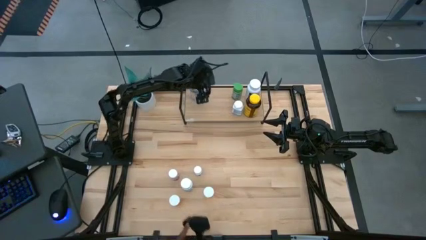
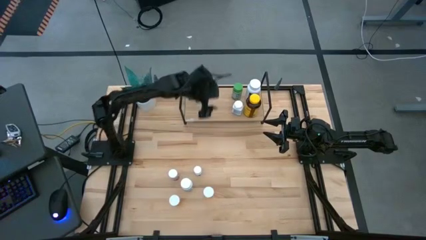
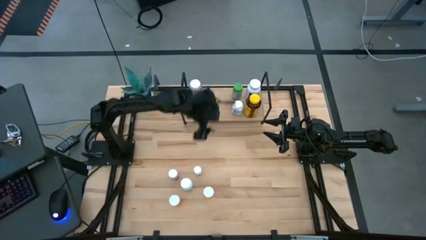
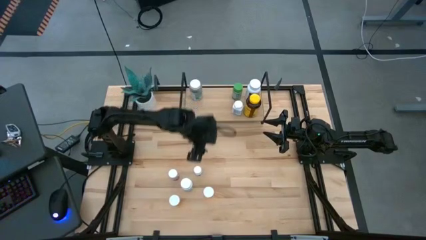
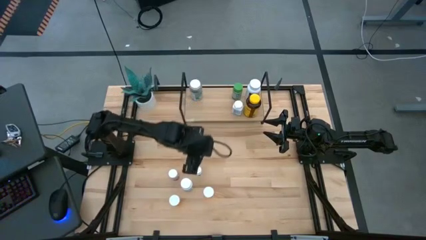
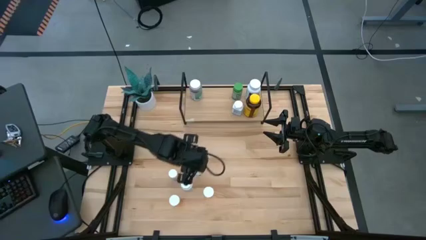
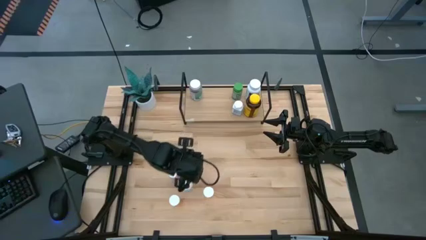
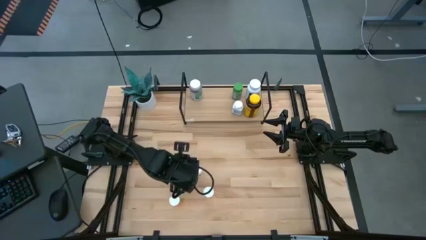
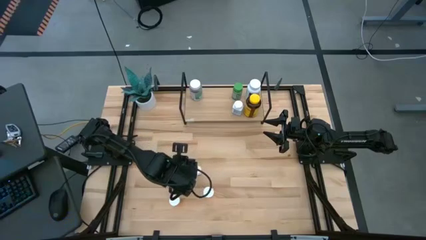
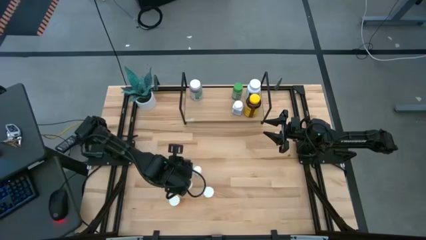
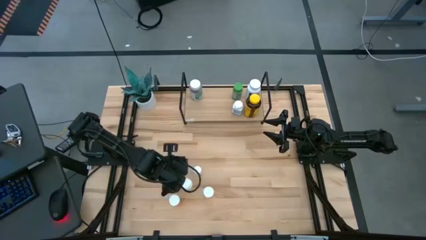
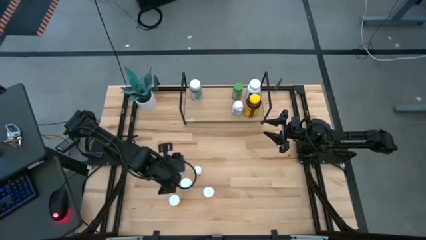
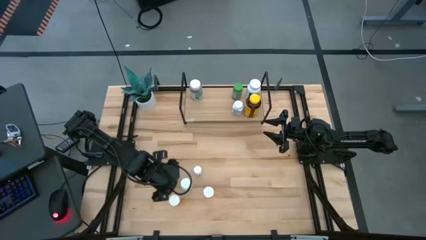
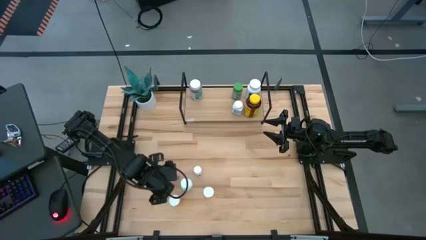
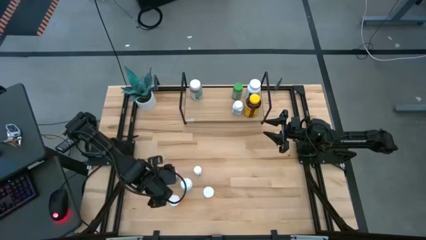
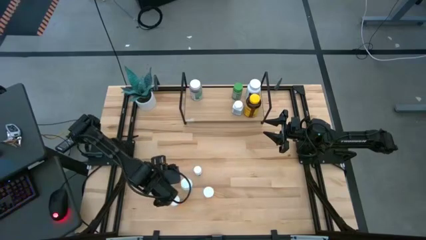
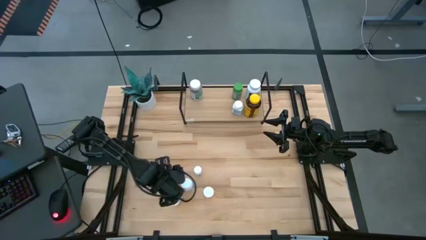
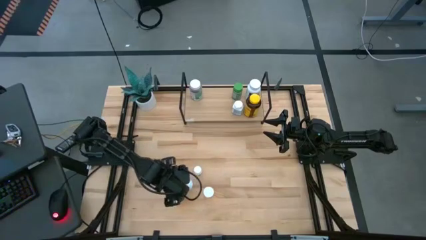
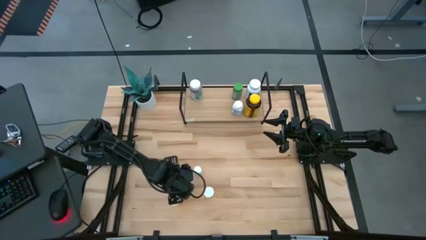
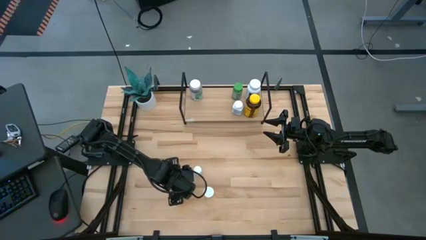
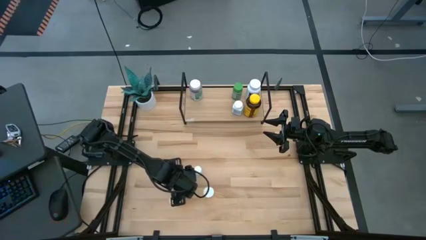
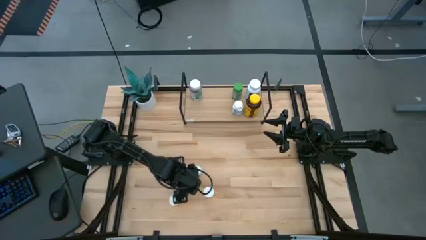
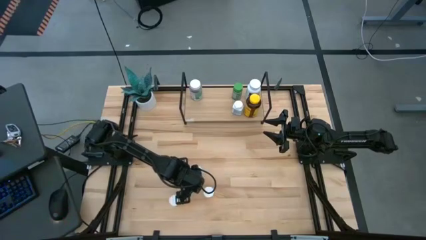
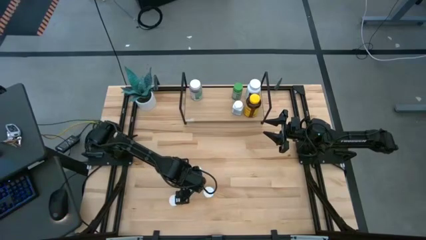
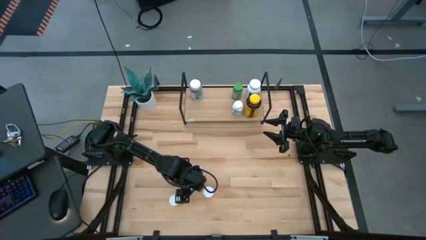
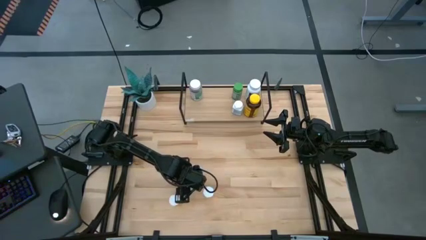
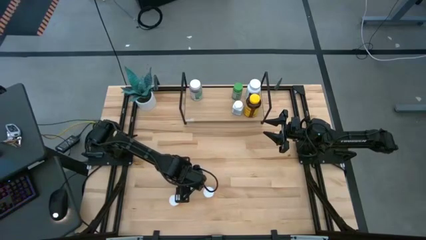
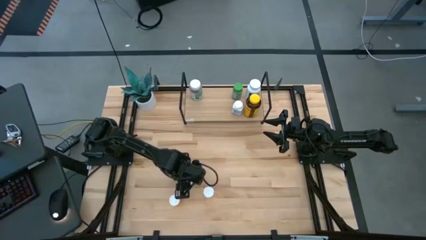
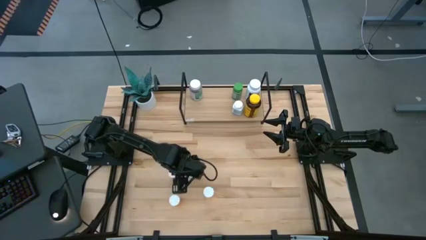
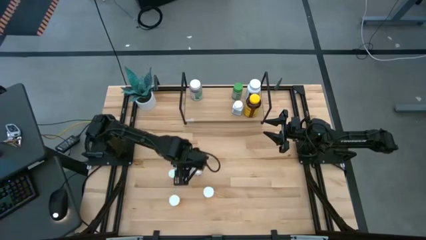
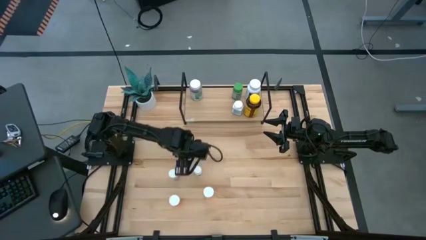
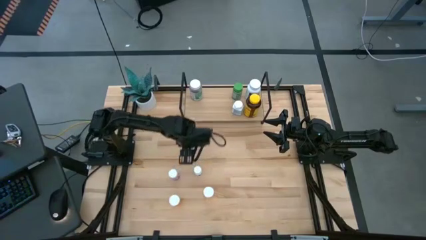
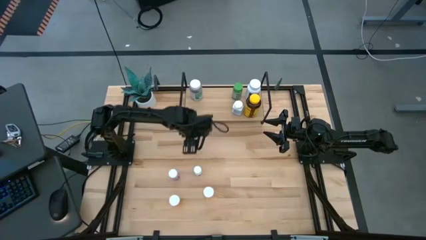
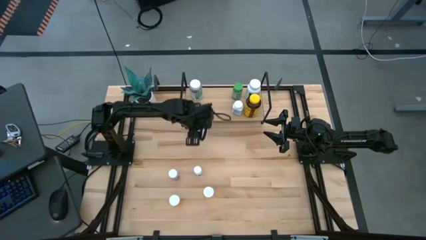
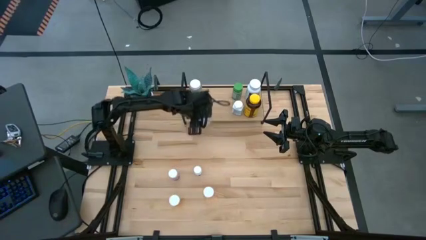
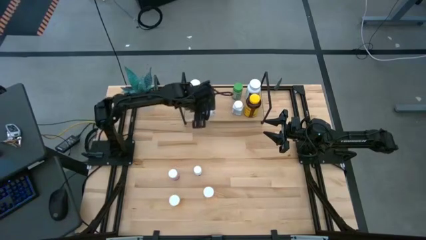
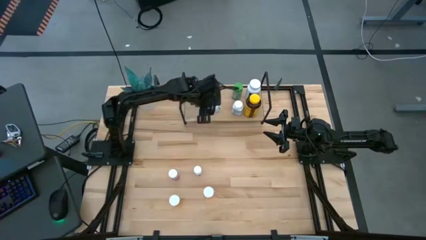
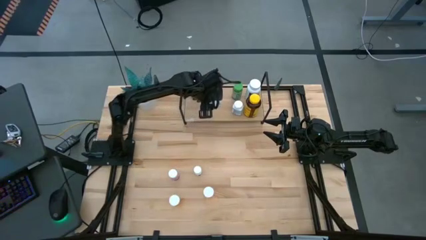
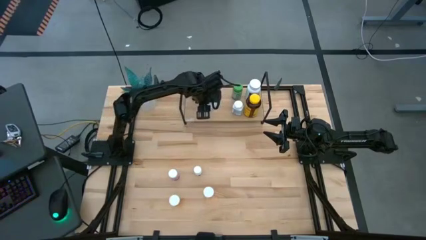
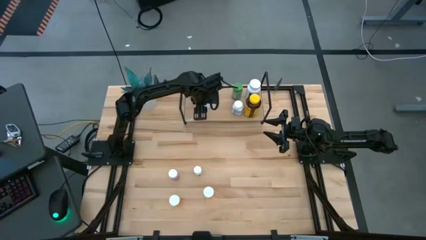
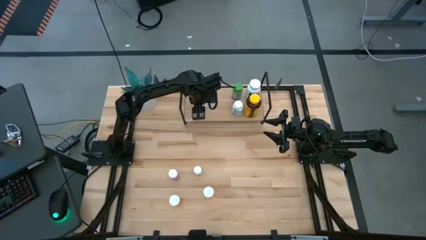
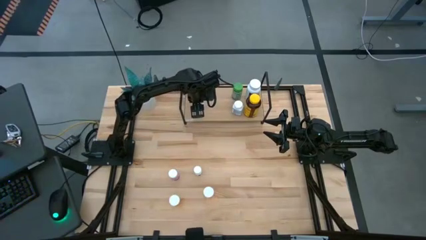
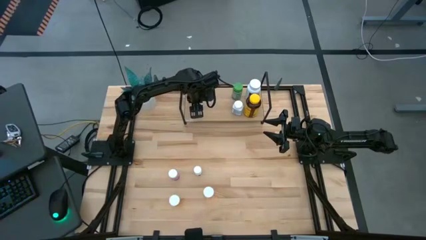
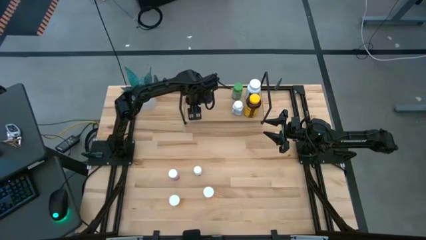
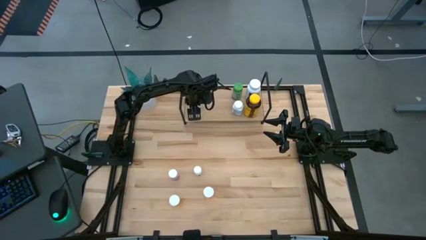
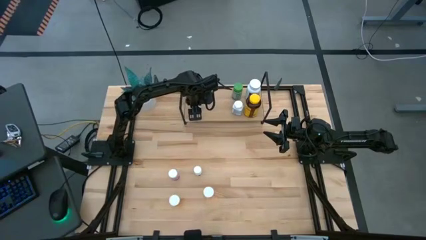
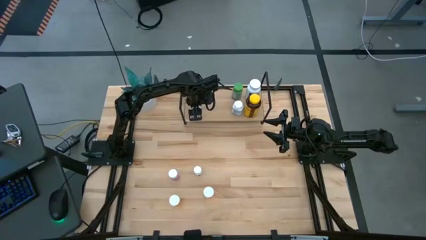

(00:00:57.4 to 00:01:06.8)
Task: Pick and place medicine bottles onto shelf by color
Put the small white medicine bottle on the shelf

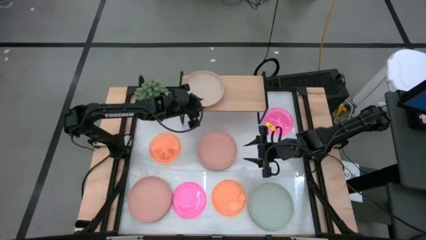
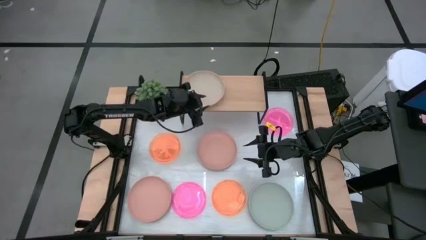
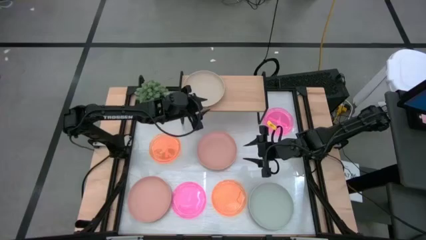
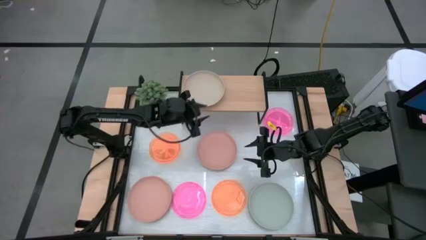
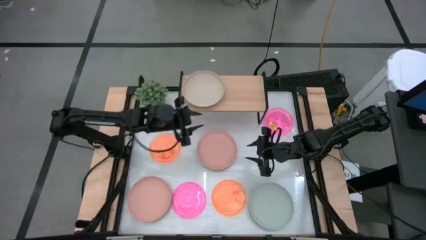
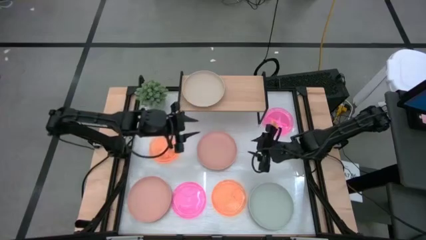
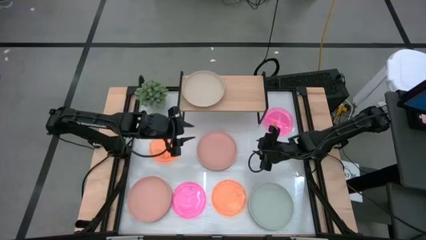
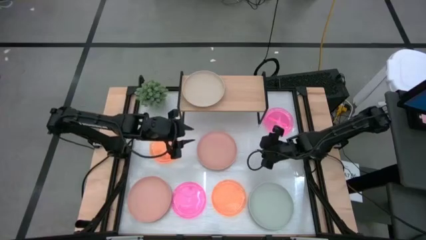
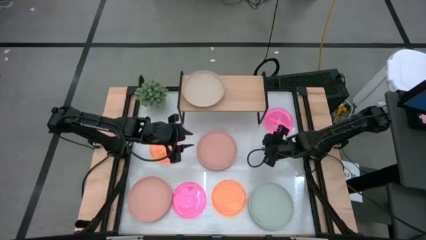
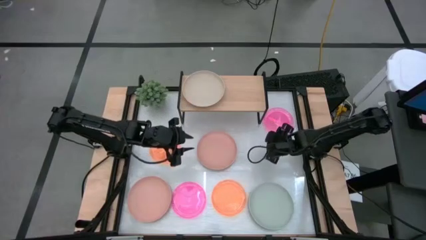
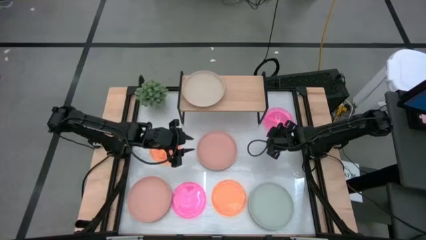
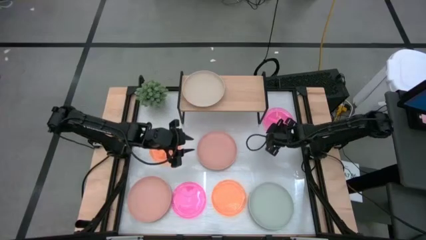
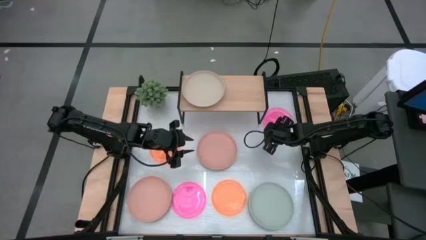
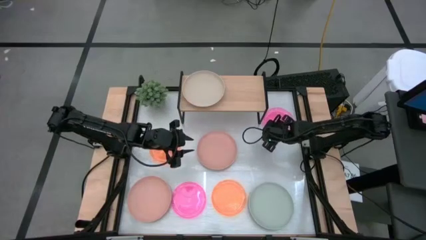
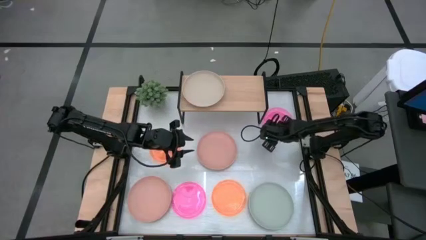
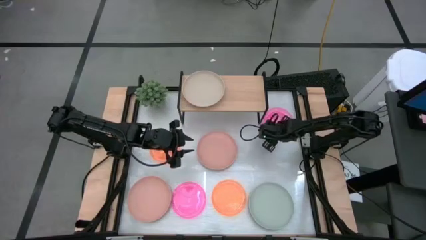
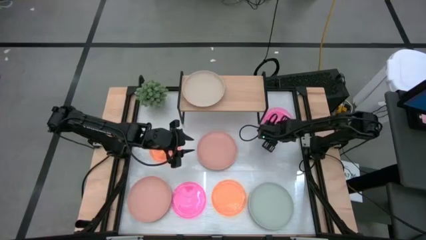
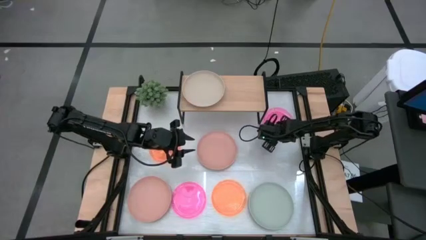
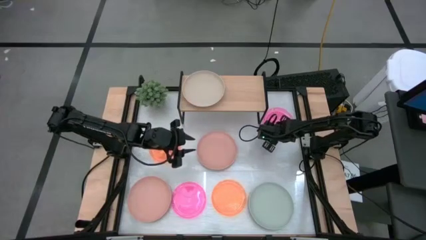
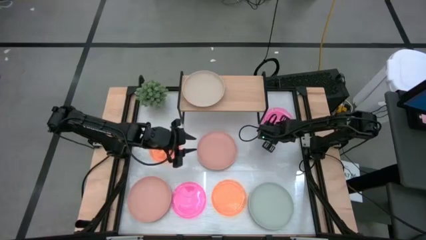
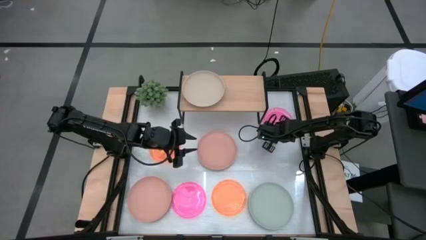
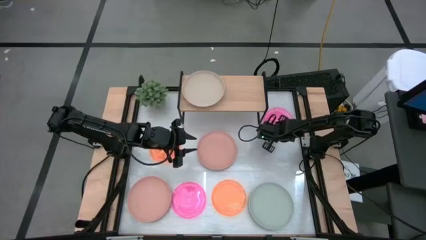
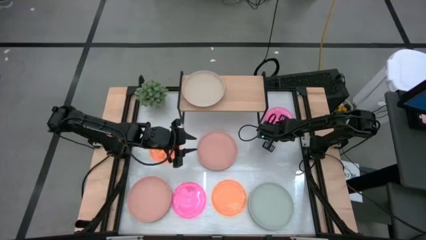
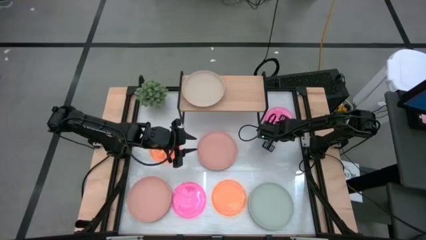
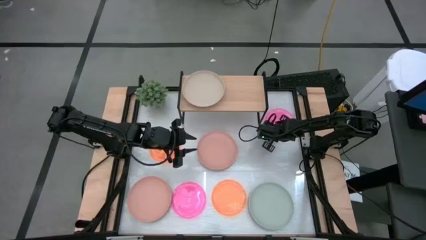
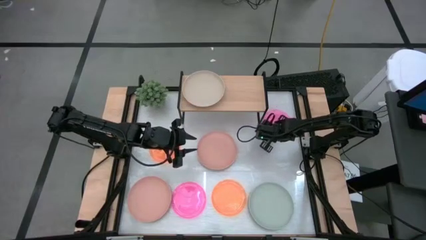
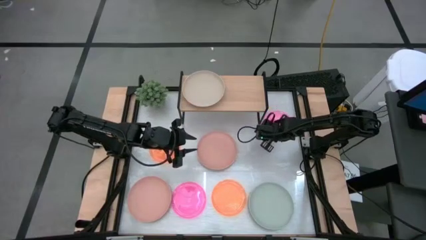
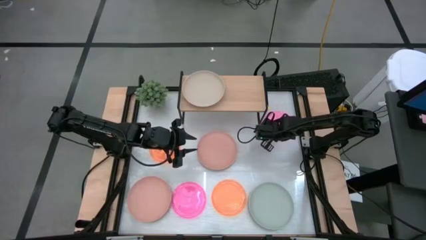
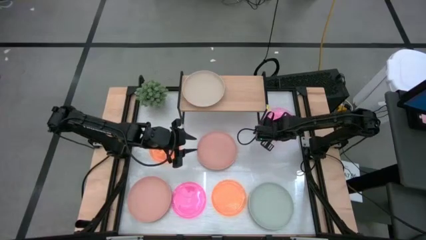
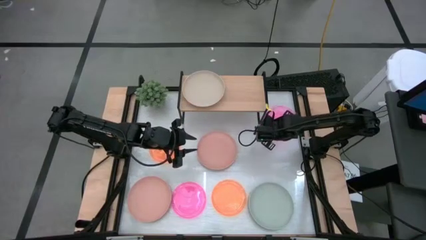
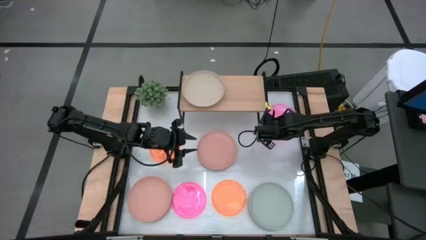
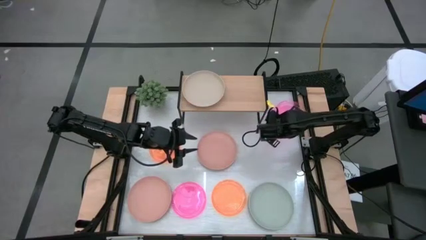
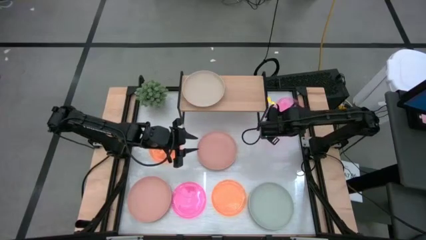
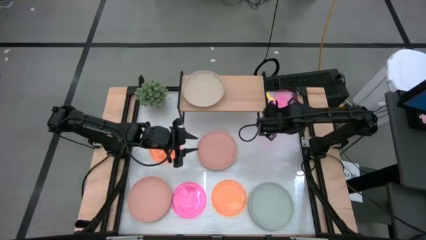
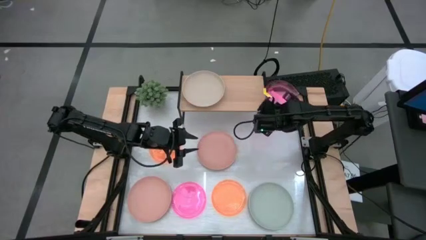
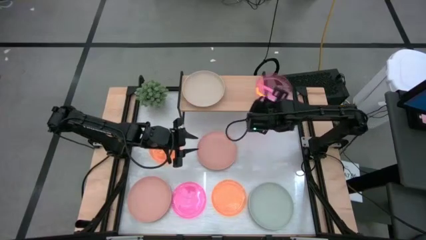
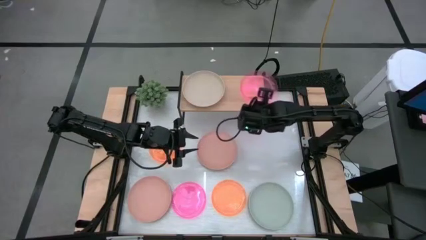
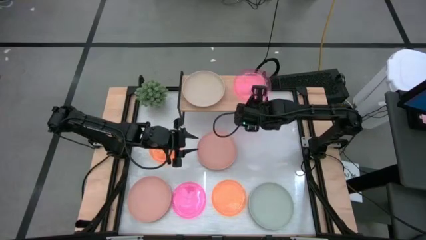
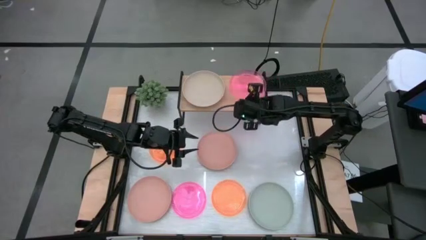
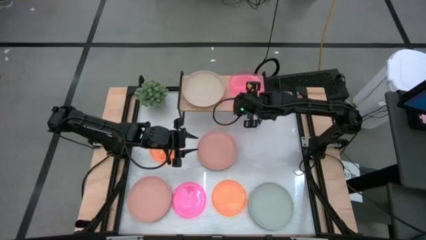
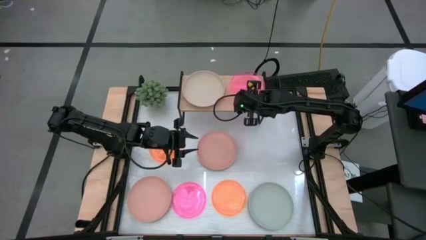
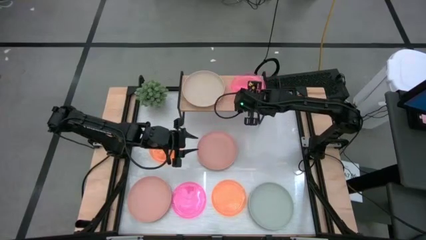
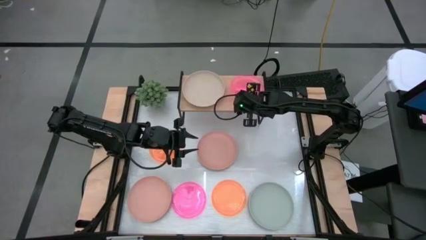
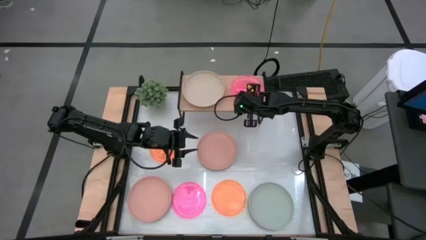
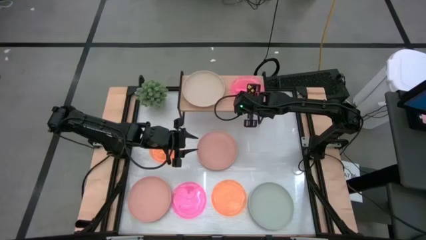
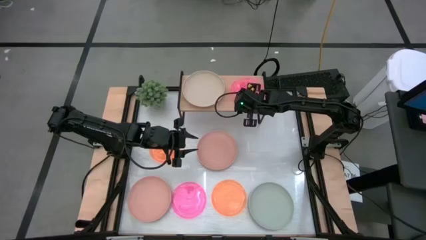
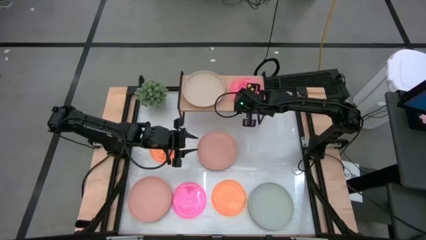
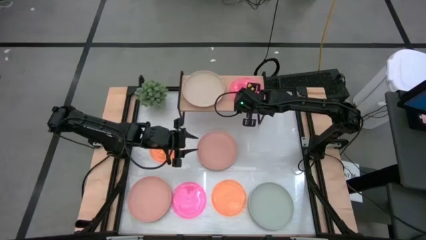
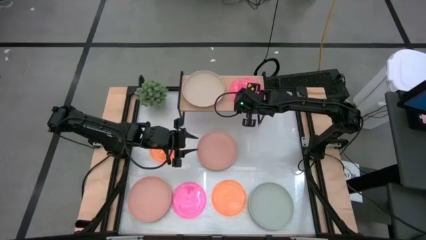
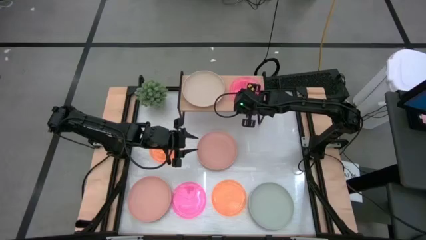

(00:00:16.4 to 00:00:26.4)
Task: Place and stack plates onto a shelf
Put the top pink plate on the shelf
